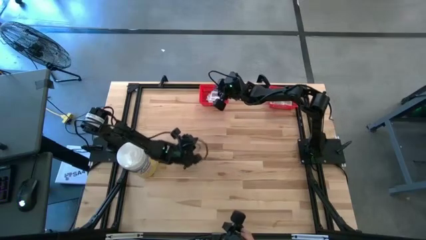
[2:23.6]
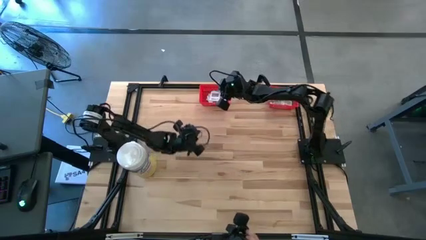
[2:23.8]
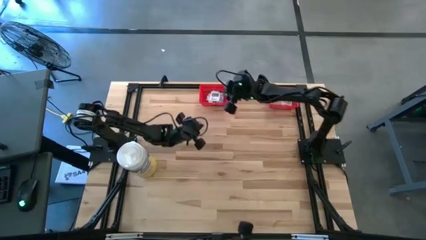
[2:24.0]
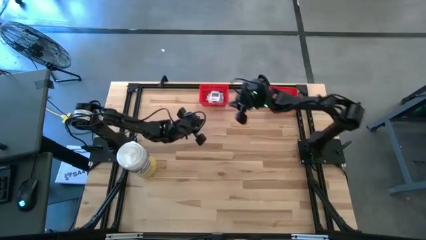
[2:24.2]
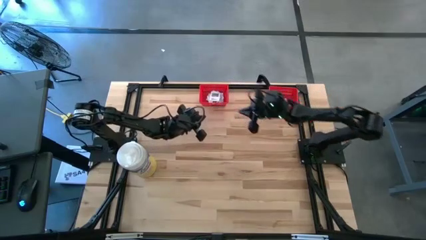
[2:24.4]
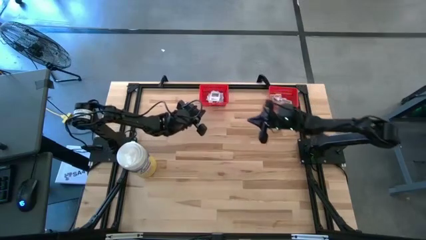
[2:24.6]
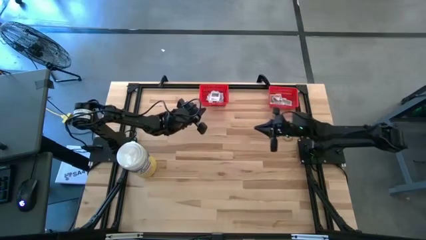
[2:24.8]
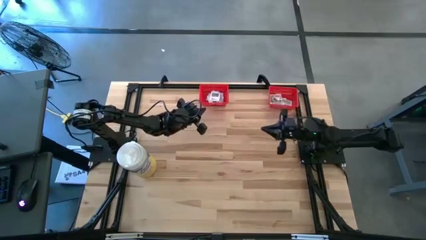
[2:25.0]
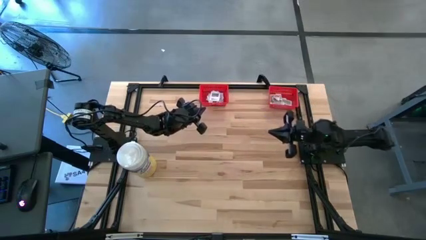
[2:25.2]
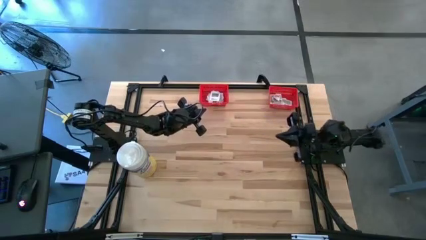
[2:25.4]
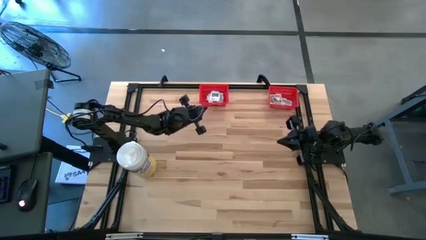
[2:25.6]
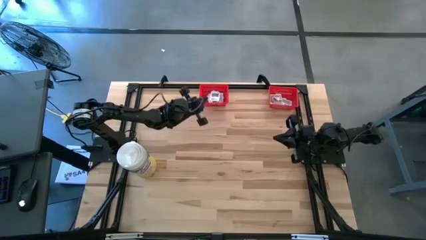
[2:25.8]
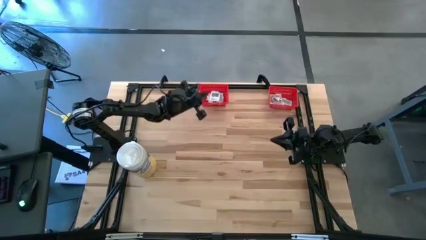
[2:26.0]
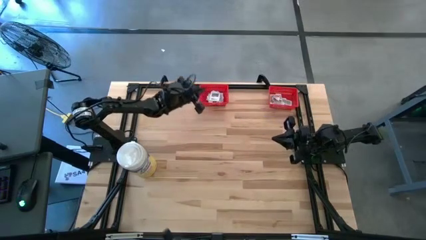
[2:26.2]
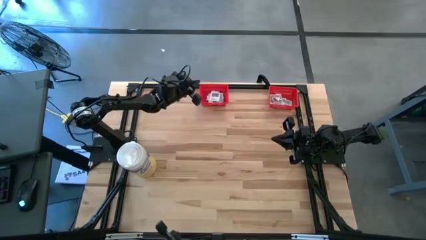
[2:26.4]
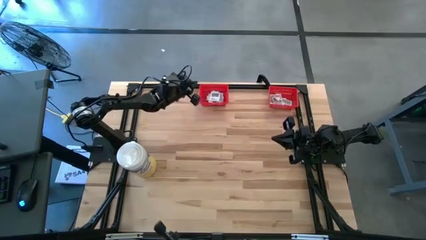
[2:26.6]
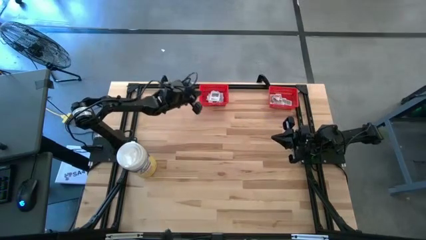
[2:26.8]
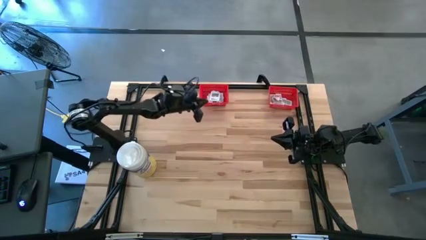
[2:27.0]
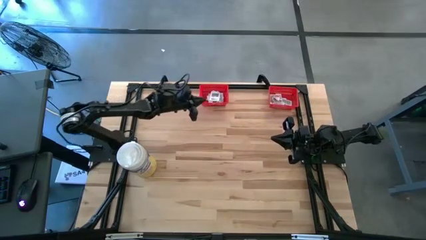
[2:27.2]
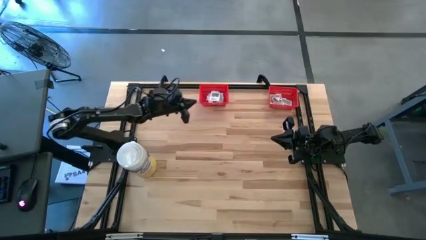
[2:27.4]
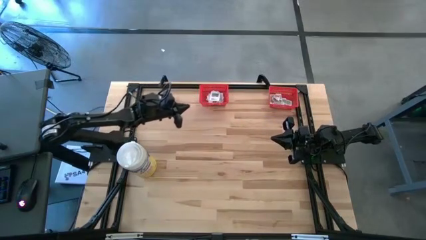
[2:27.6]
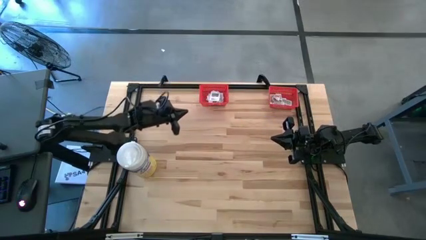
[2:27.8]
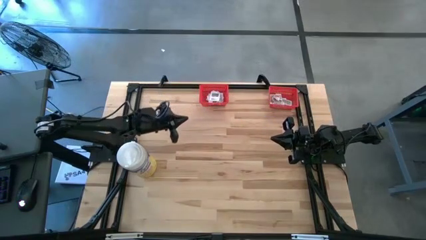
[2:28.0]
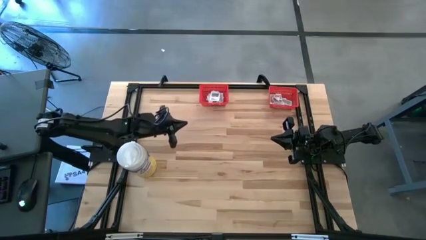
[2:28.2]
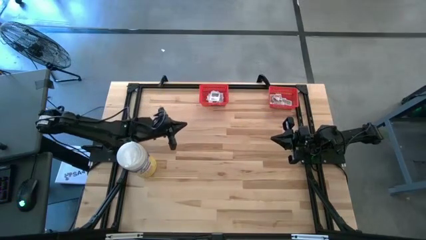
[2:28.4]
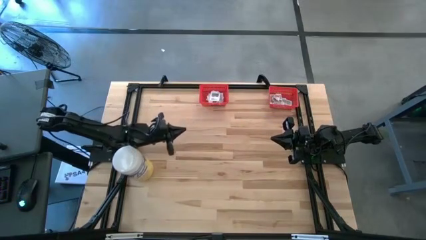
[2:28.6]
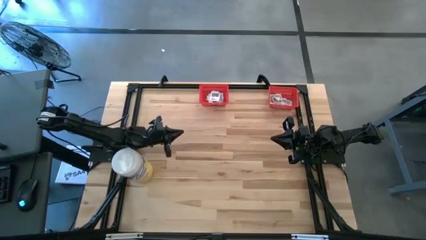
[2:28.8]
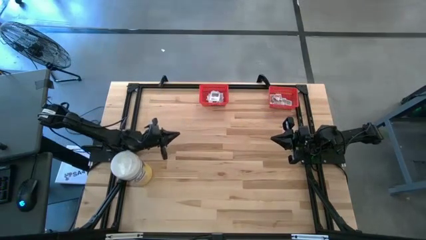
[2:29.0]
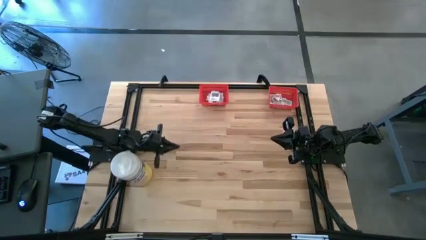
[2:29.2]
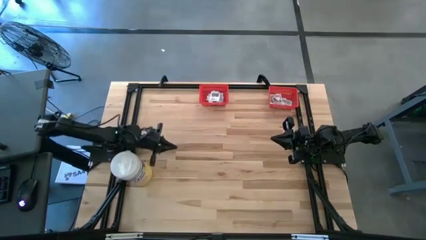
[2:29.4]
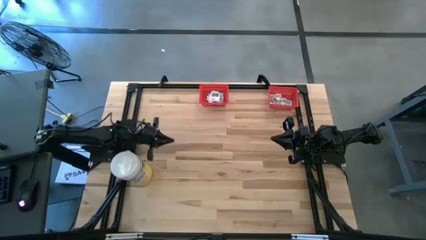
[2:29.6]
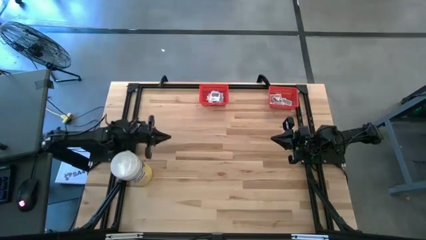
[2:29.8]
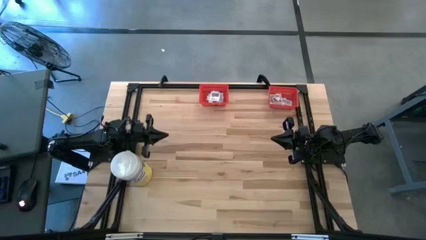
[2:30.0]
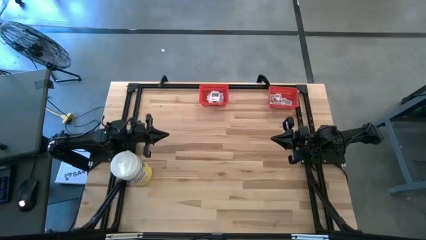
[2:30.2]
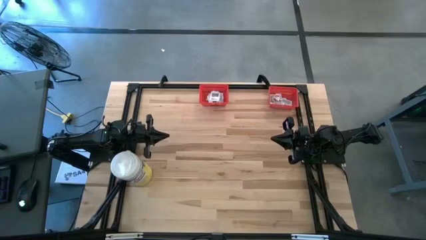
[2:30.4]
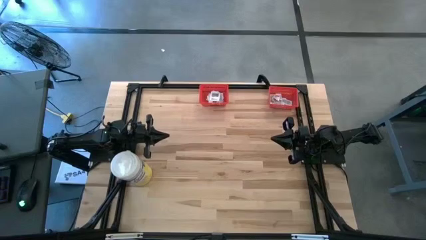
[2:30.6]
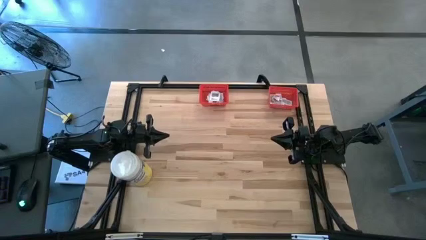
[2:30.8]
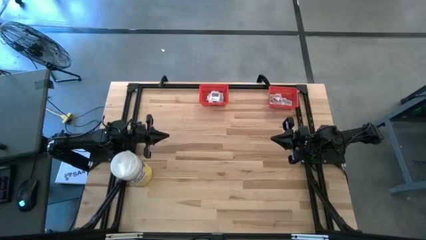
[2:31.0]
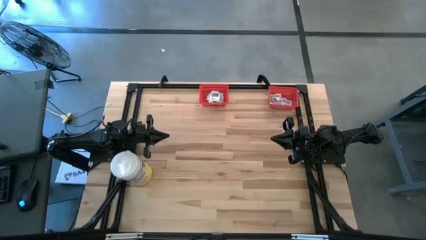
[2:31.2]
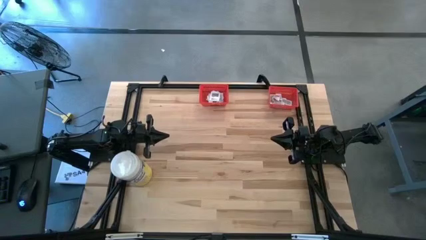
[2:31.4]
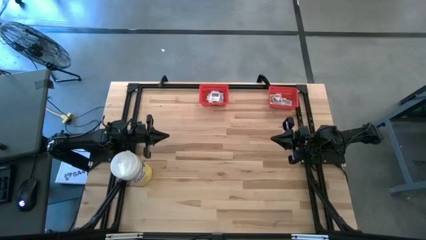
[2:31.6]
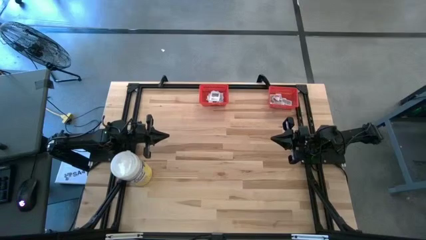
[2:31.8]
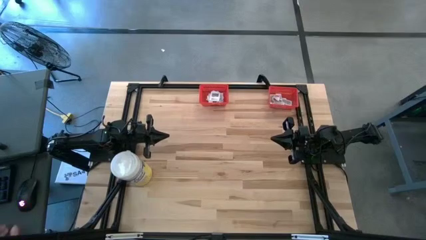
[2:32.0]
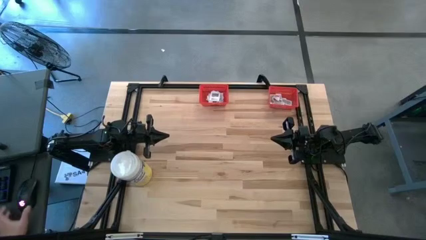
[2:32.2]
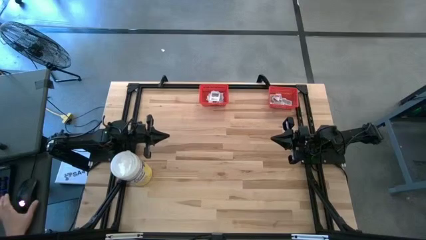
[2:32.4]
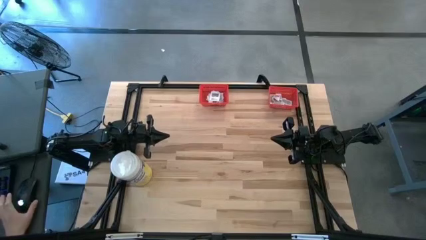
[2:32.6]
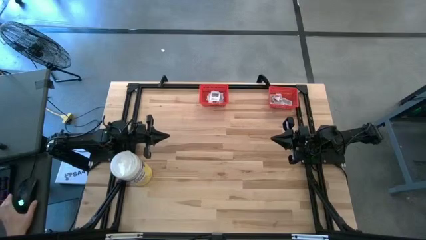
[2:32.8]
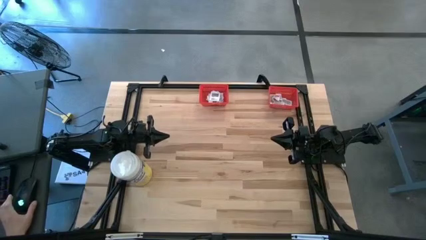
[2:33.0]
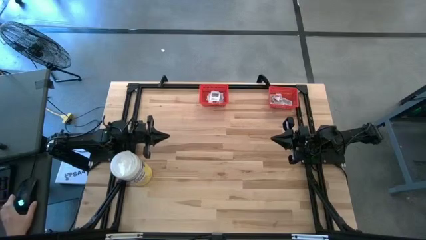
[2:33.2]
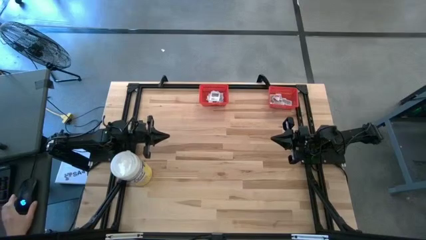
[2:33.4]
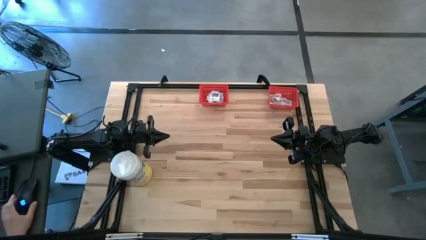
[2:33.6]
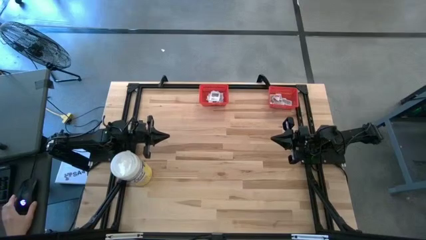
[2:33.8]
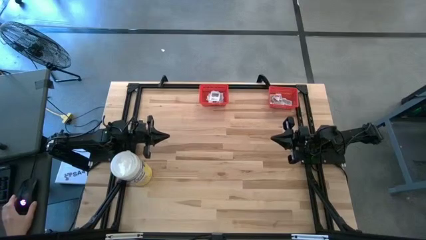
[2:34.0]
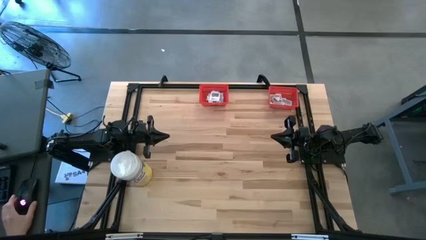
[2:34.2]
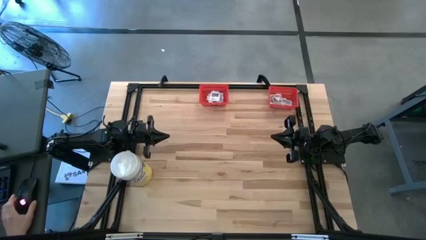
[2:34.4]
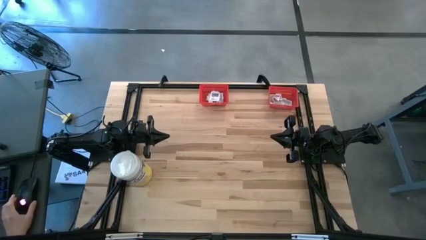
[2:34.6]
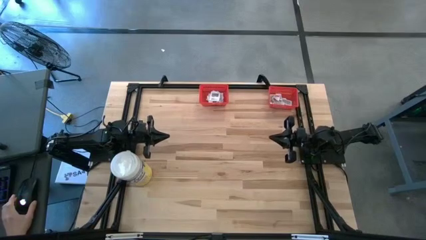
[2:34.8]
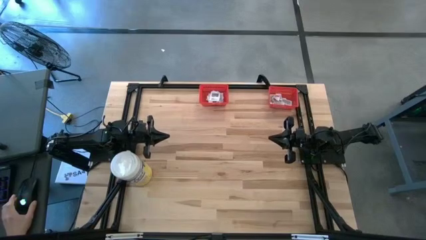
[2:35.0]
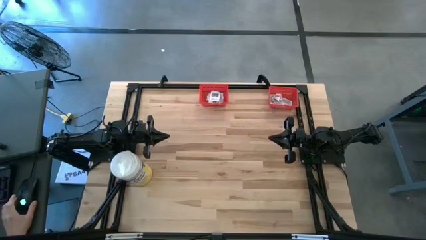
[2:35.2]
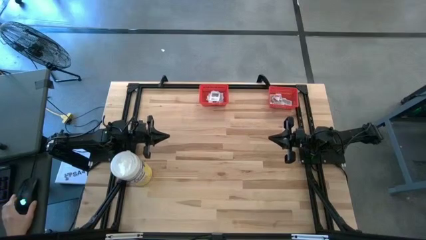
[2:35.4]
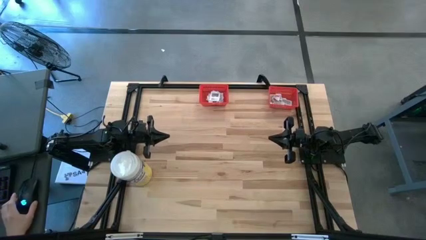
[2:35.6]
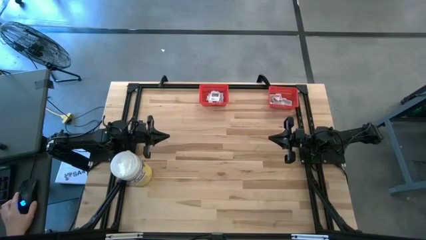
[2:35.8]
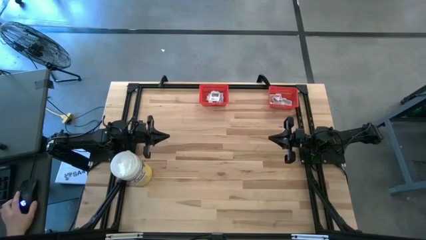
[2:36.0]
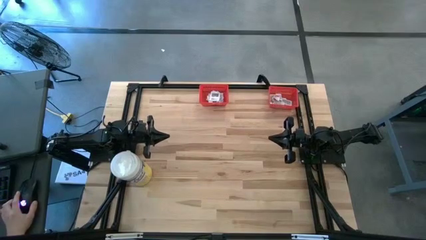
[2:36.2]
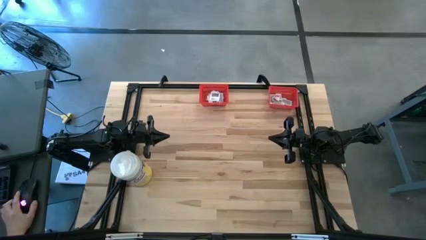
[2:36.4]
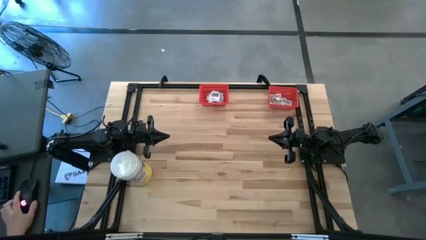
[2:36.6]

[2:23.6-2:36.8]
Task: Pick & Place First Aid Supplies
Return to Home Position

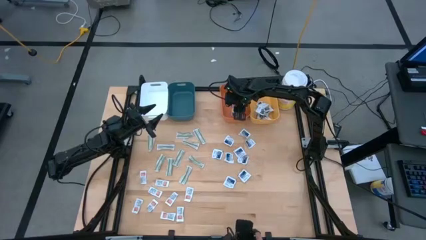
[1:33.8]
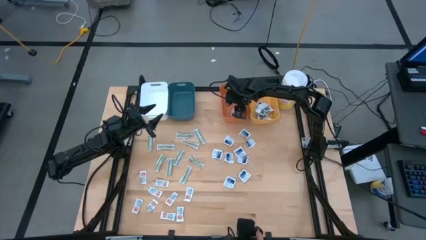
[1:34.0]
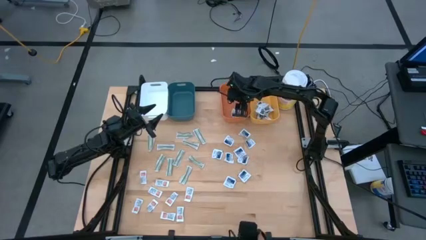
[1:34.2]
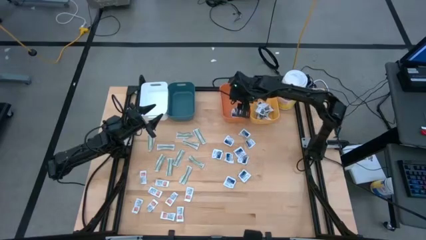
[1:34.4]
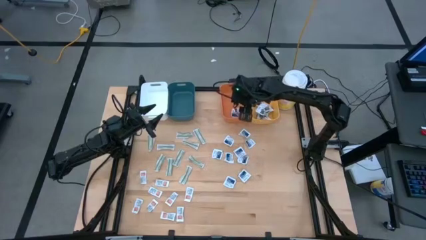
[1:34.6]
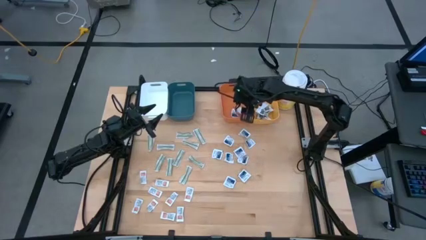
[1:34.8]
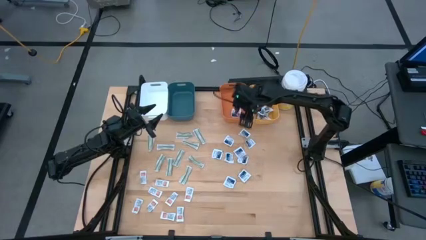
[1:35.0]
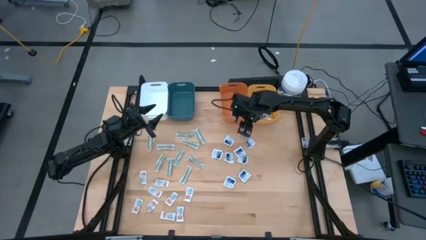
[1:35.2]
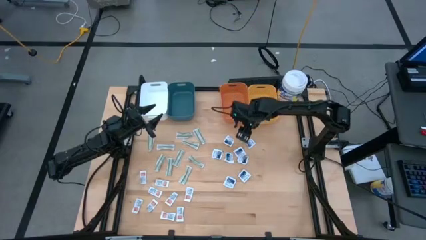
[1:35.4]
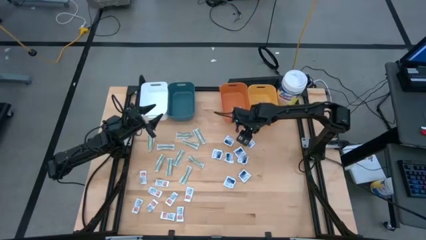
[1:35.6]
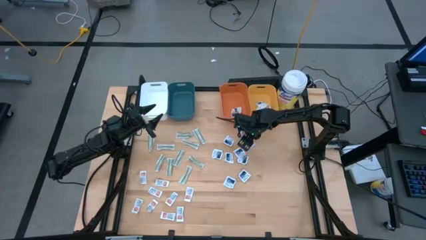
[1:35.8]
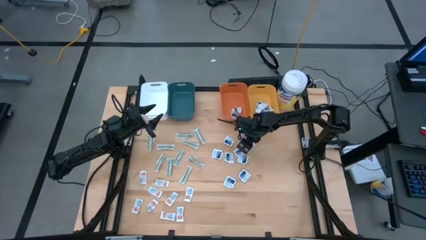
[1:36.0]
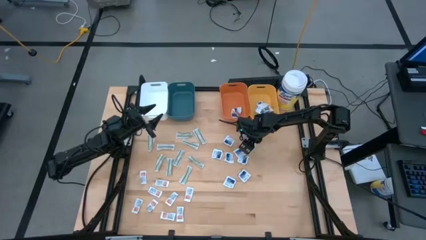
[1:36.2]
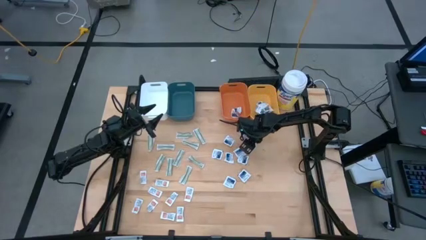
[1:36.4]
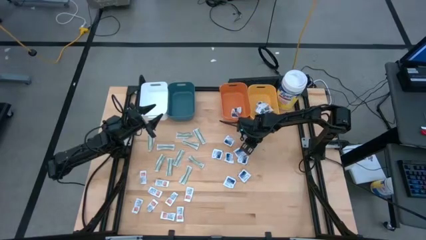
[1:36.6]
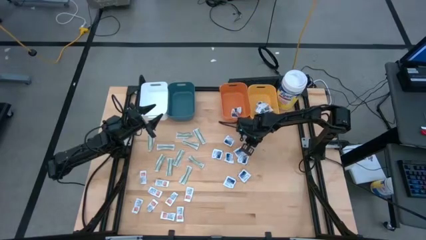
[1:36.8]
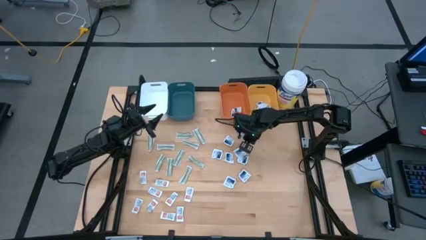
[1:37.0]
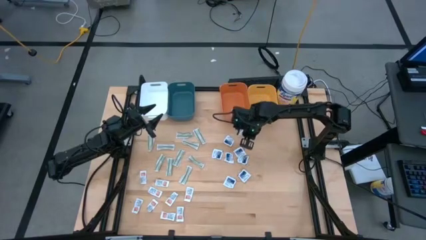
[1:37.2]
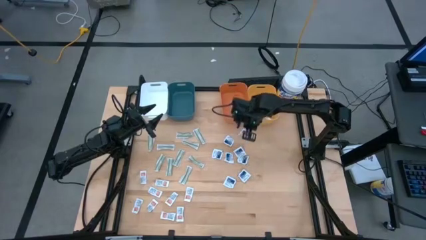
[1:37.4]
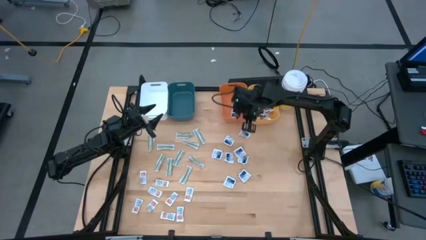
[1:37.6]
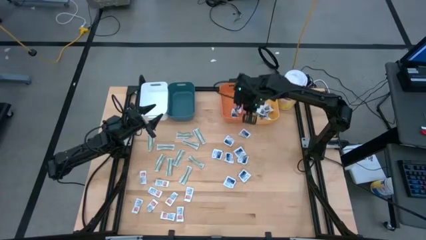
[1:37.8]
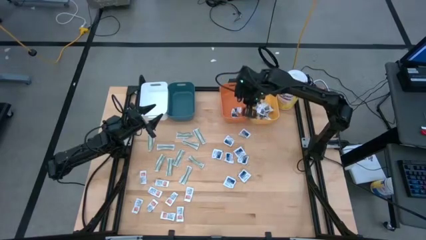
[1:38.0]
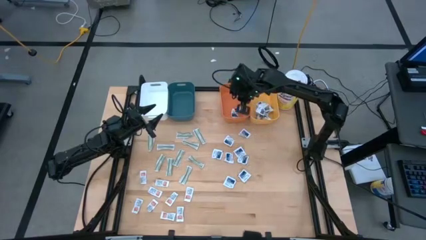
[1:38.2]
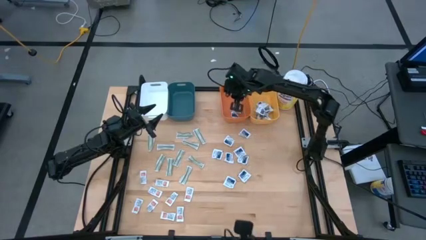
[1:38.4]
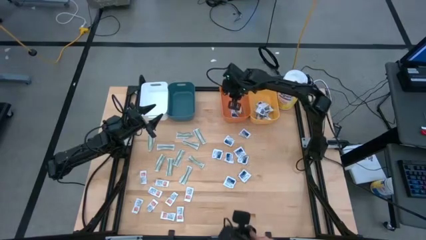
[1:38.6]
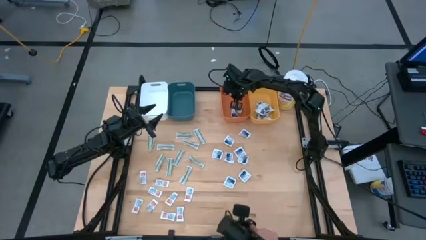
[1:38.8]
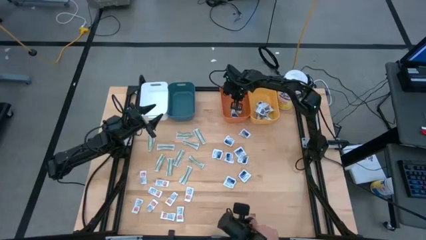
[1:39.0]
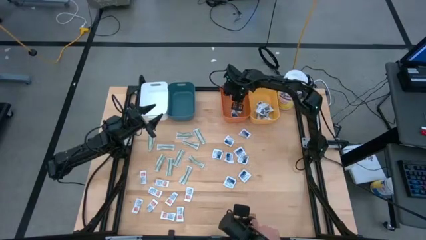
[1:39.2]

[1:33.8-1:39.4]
Task: Pick & Place First Aid Supplies
Put the alcohol pad into the orange bin
